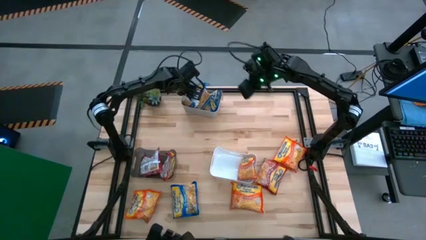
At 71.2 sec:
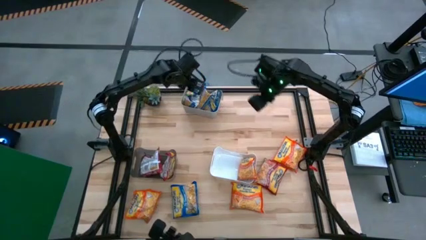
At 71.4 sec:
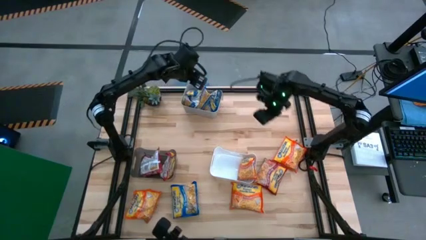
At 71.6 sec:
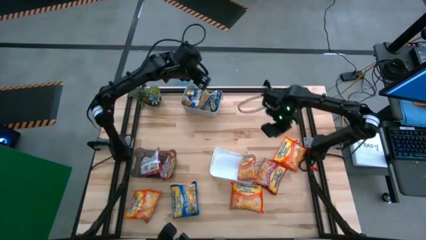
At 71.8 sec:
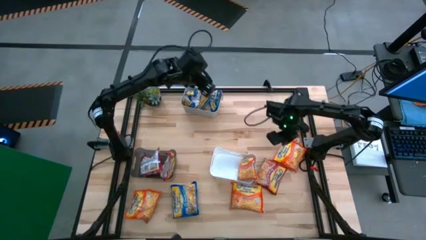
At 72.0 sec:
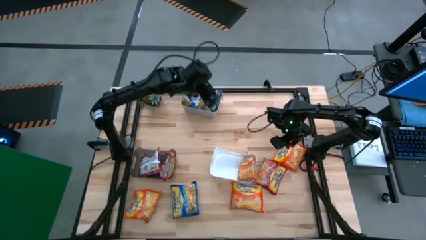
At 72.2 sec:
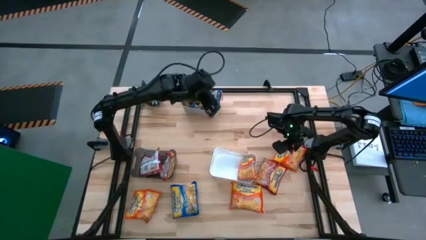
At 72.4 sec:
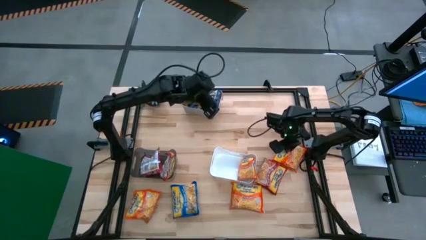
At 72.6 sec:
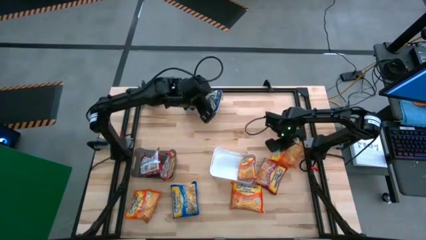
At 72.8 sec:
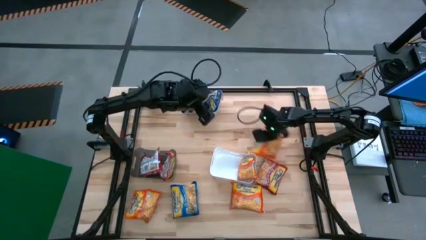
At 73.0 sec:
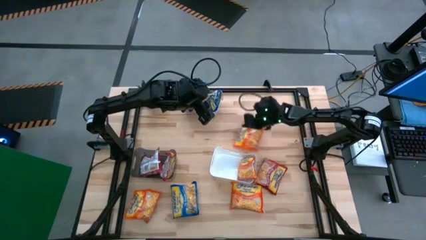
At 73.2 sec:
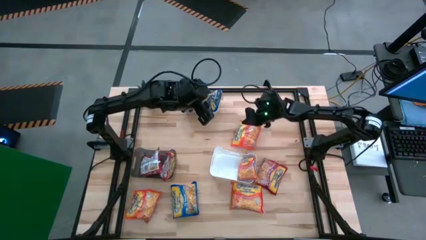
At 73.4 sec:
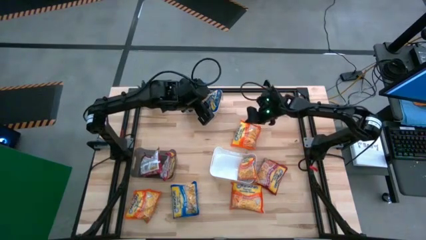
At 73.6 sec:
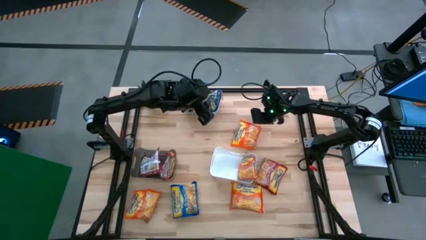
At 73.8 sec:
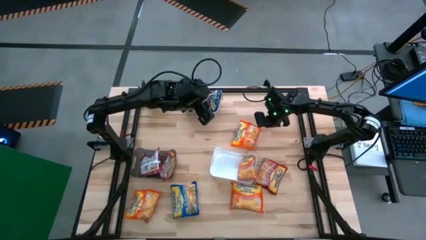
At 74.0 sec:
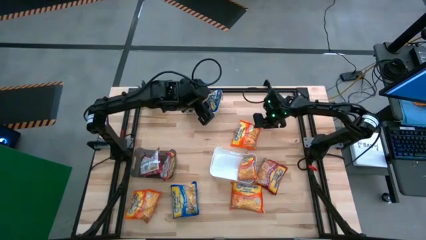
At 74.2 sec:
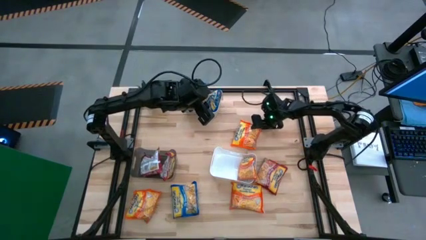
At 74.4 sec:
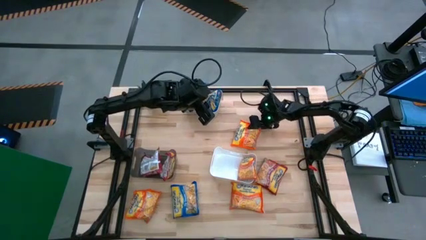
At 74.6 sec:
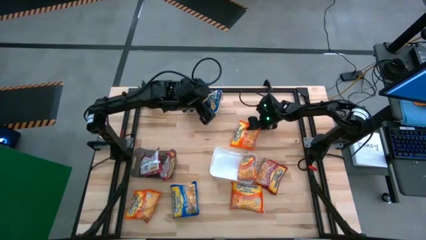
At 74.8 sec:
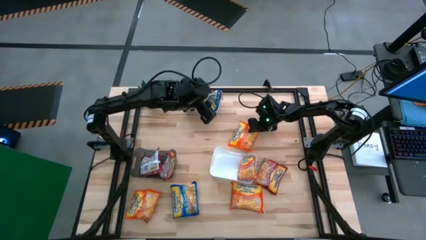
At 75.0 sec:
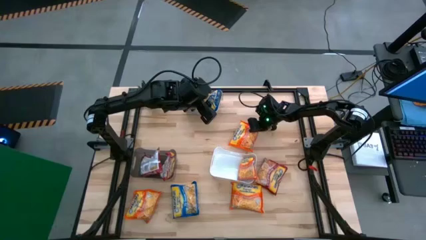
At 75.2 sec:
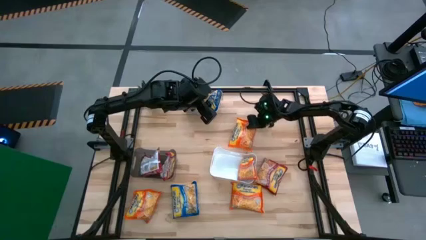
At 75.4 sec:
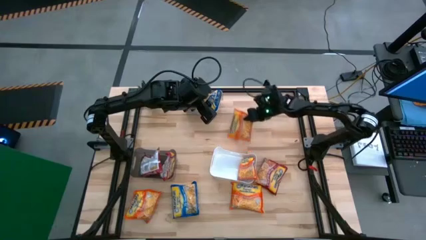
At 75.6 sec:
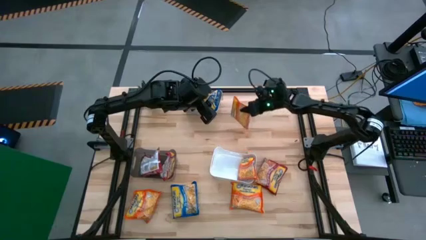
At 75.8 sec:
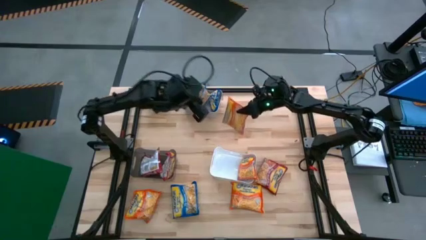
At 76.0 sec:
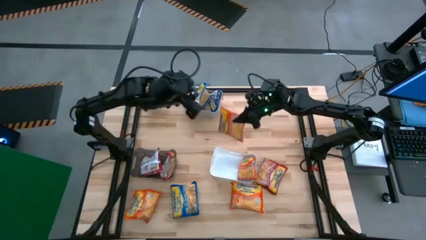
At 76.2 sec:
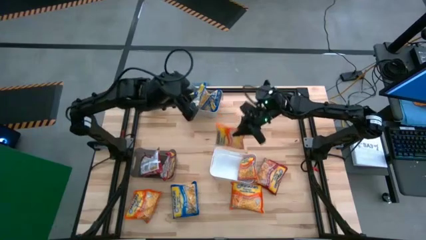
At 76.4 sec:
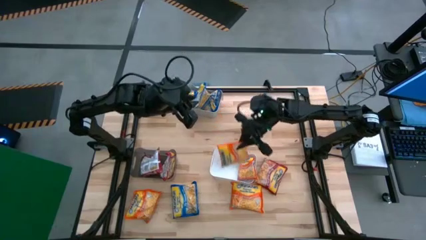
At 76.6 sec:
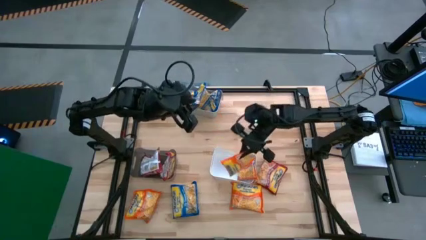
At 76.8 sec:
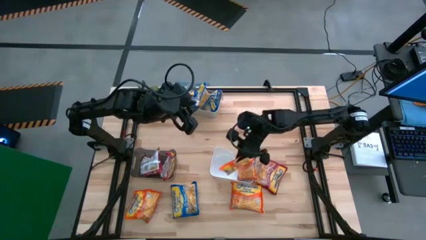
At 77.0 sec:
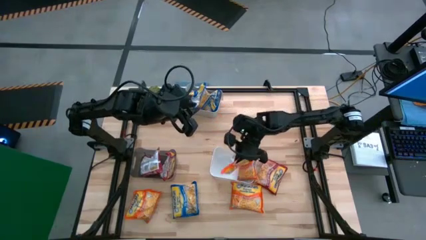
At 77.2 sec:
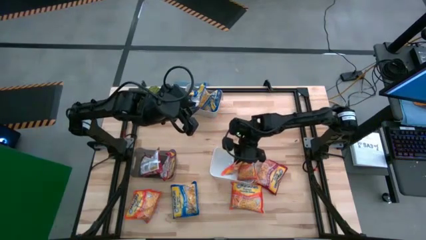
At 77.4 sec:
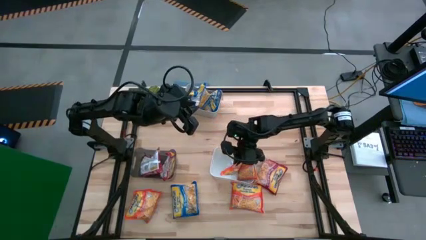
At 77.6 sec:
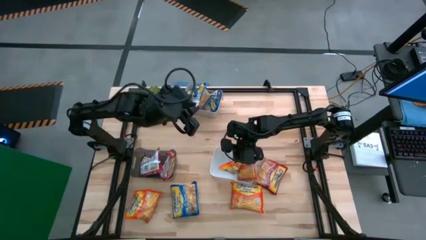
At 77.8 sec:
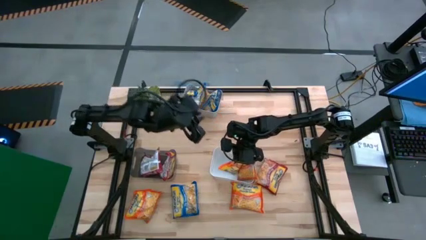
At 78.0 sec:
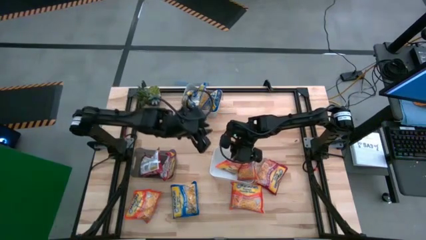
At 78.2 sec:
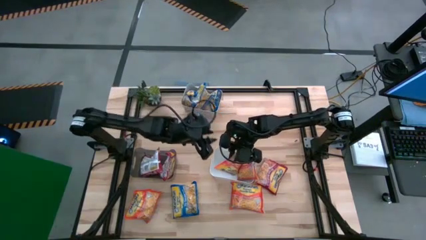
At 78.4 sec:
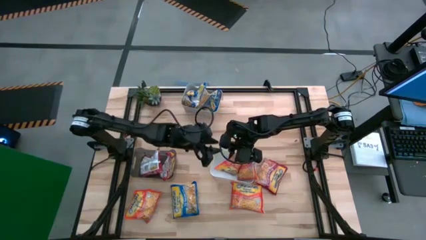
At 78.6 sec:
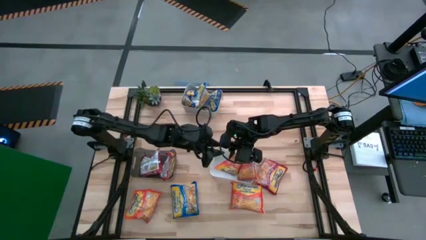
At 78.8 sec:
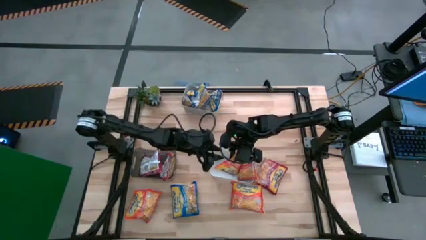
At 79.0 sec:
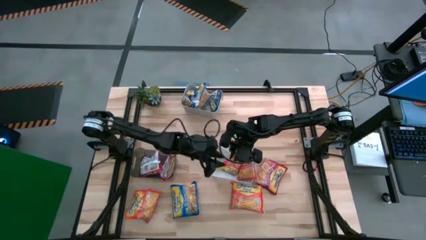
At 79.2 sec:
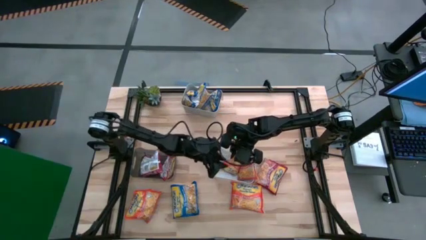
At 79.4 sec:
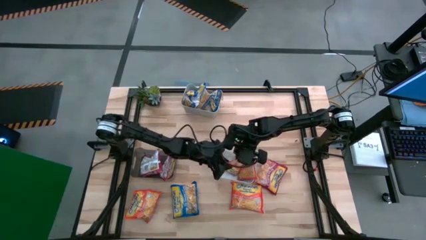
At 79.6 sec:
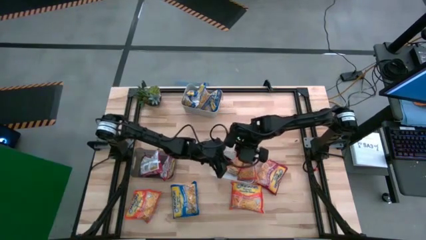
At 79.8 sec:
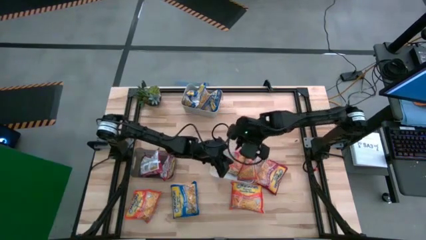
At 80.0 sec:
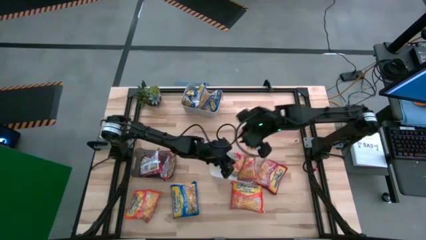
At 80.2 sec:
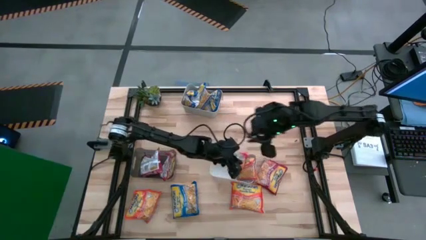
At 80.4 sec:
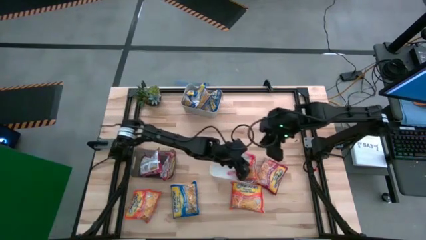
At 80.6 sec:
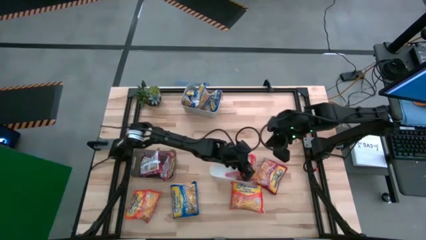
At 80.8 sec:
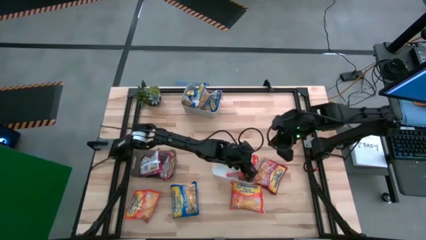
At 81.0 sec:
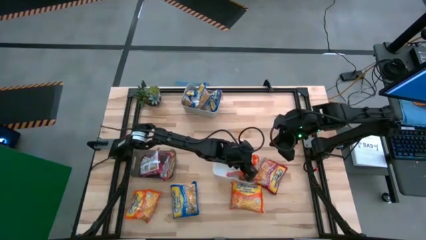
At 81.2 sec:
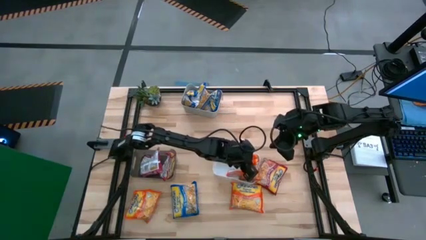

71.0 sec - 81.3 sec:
Task: Sort Maruchan noodles
Put the orange noodle pack into the white bin
